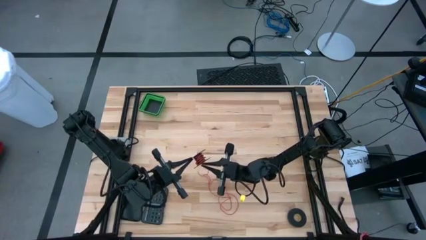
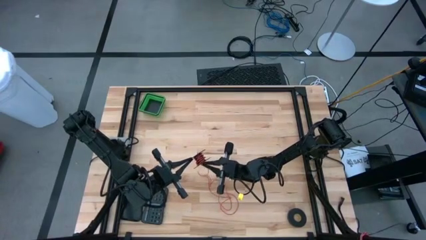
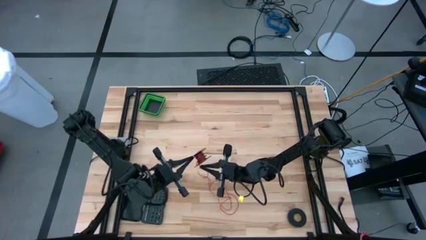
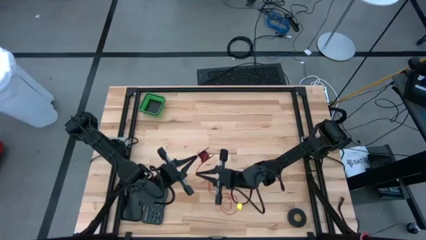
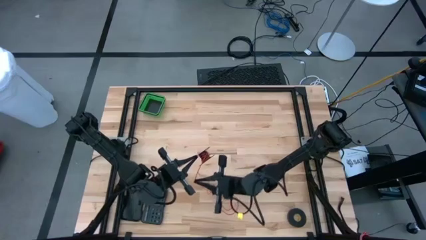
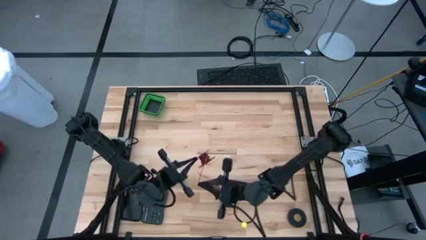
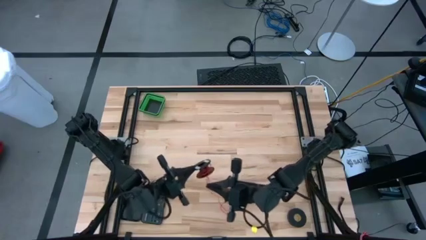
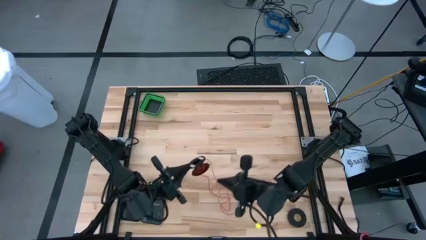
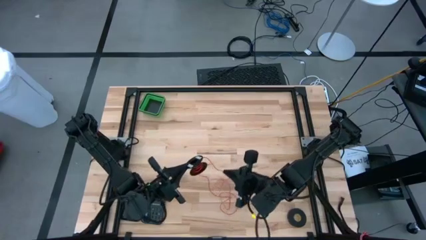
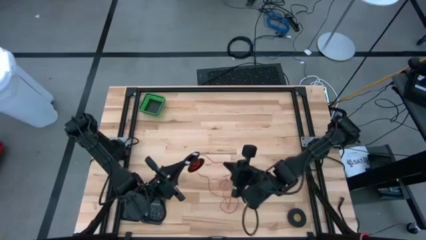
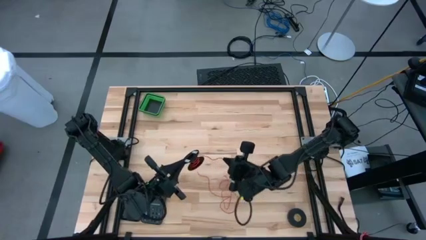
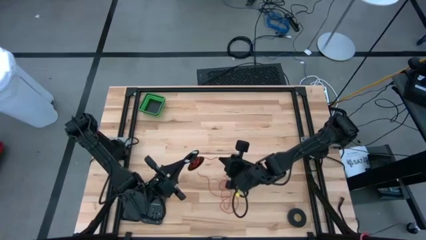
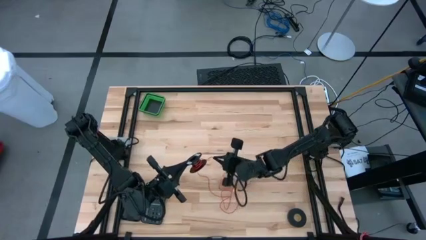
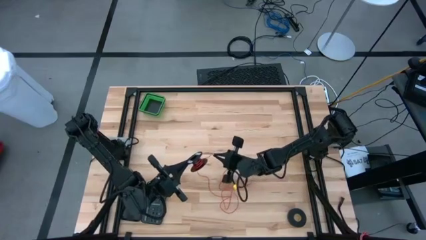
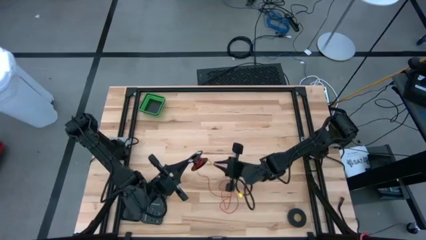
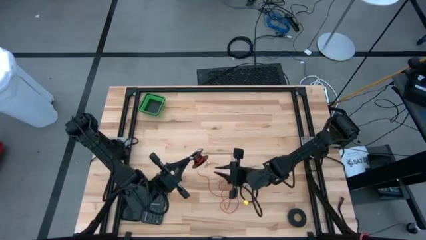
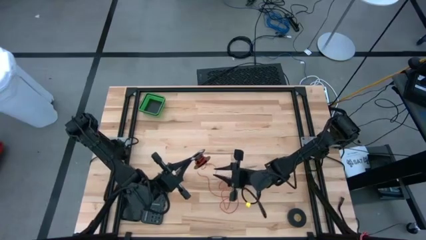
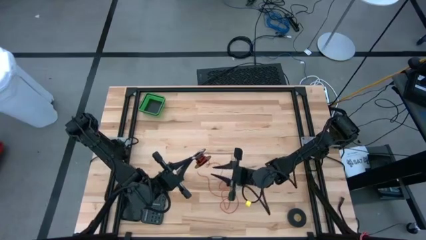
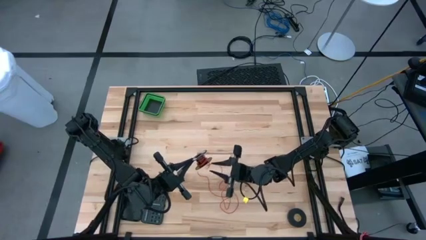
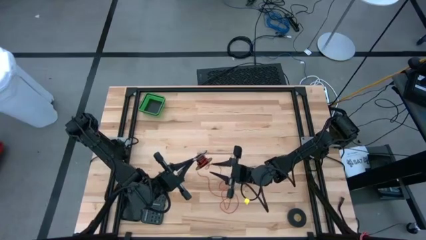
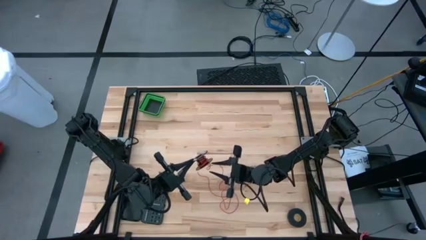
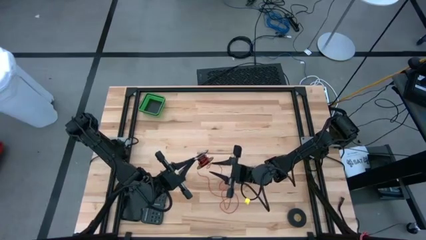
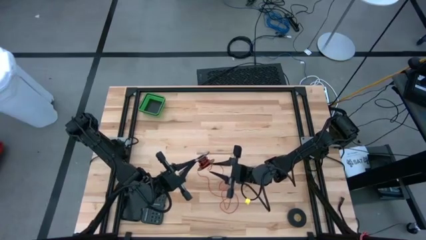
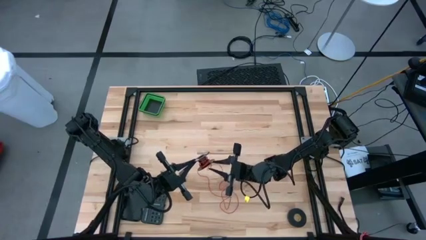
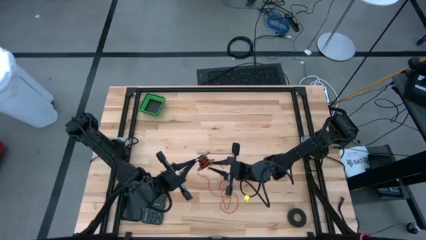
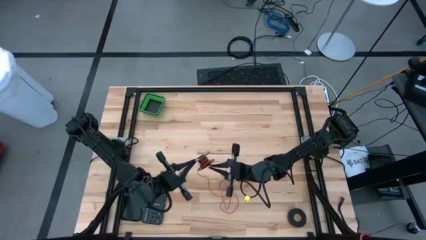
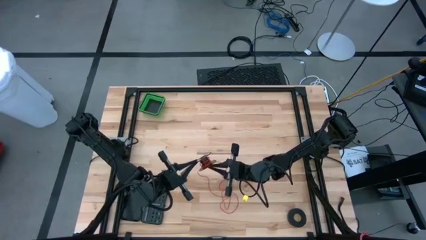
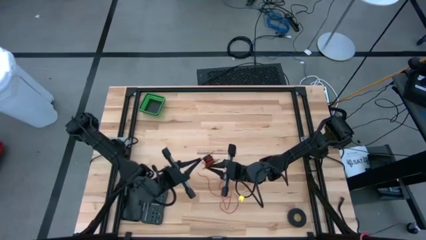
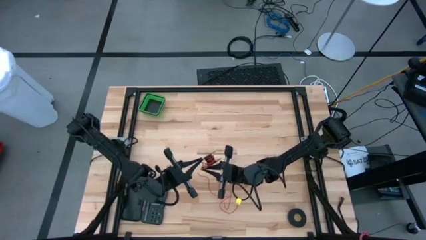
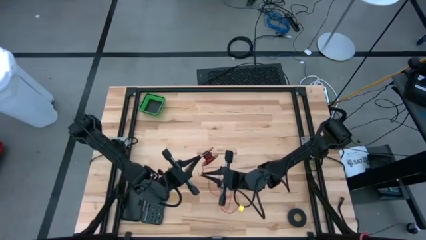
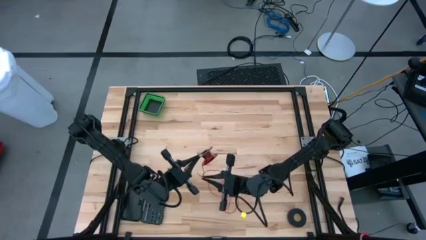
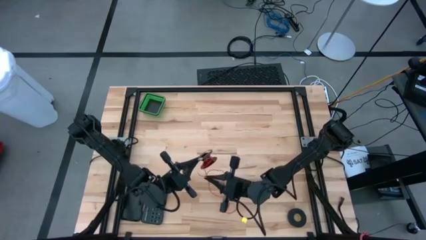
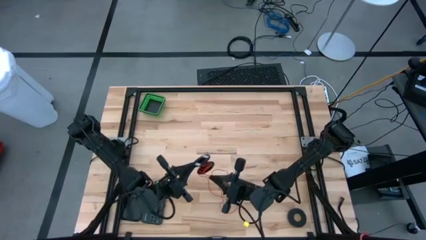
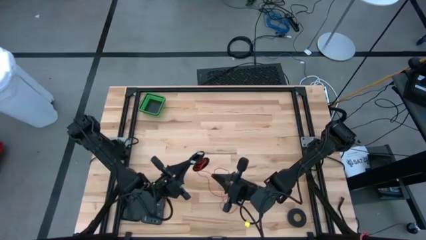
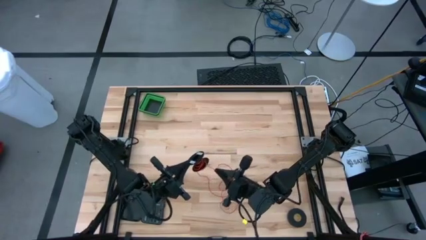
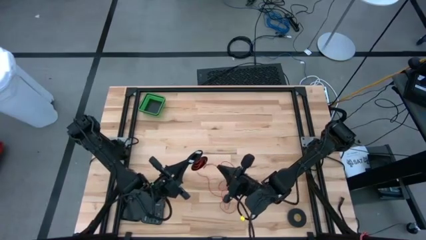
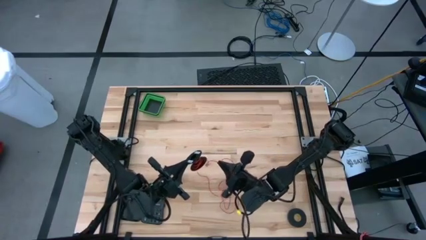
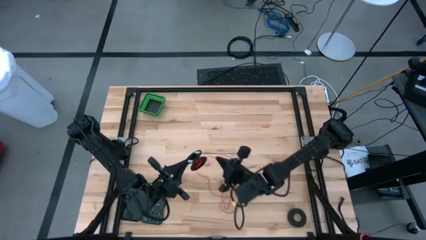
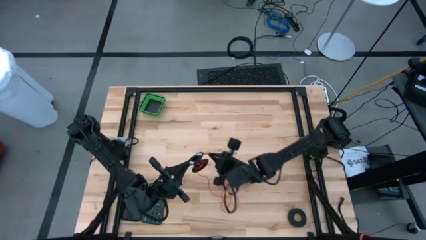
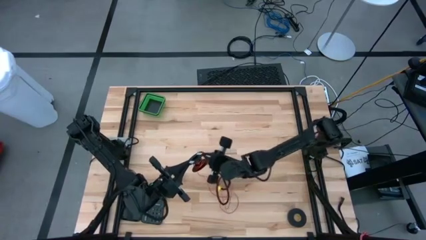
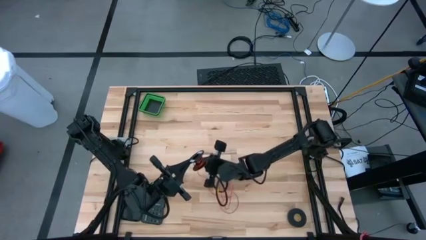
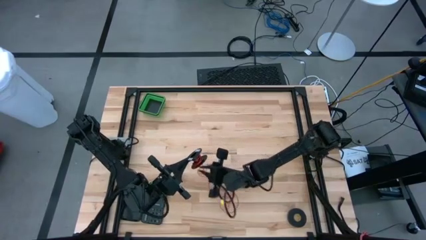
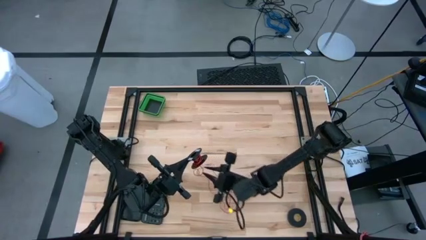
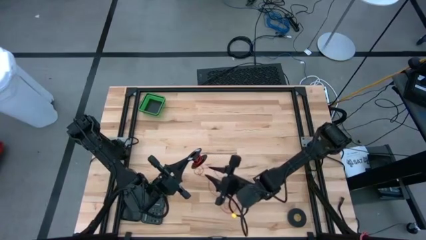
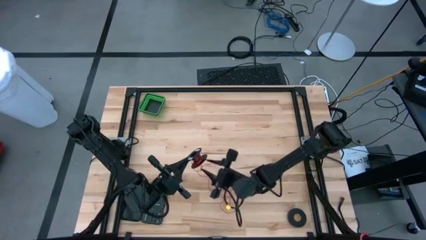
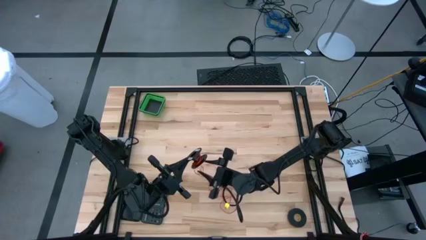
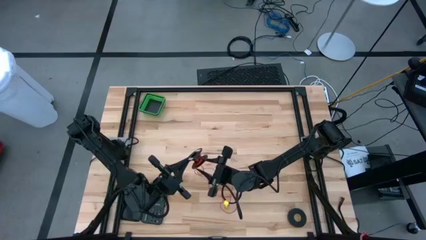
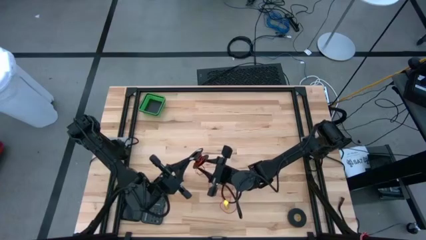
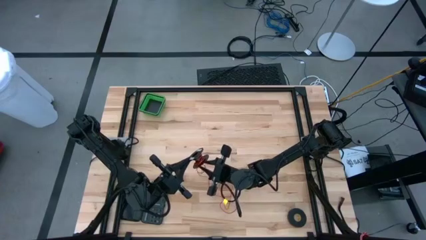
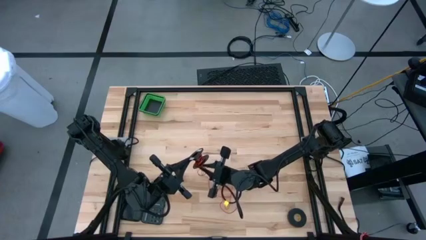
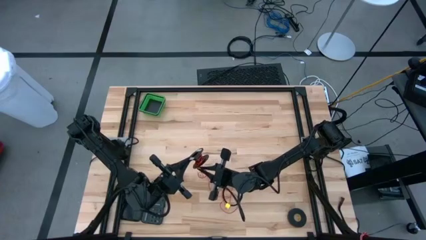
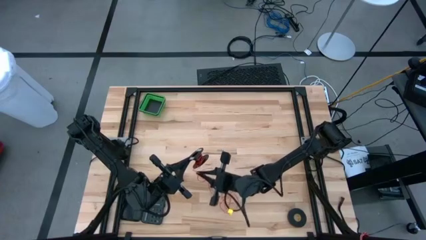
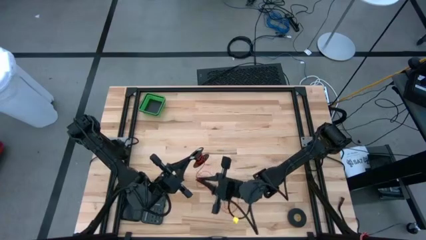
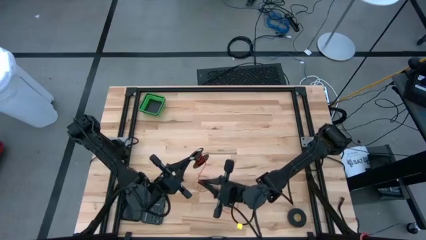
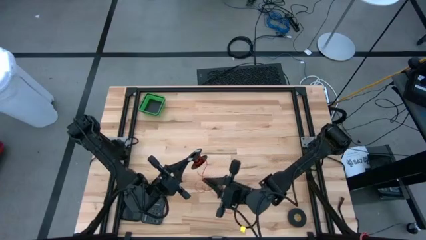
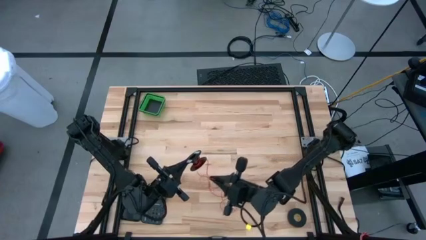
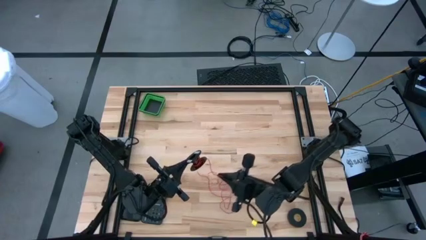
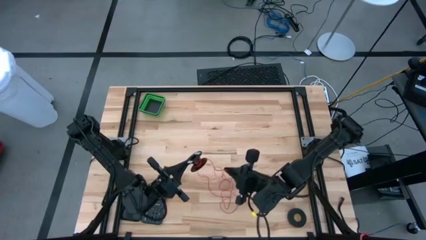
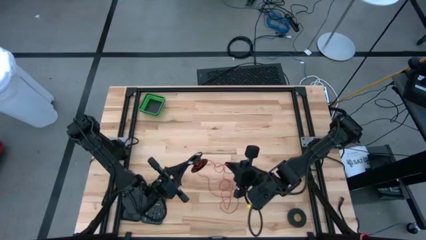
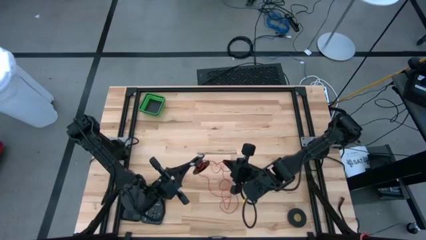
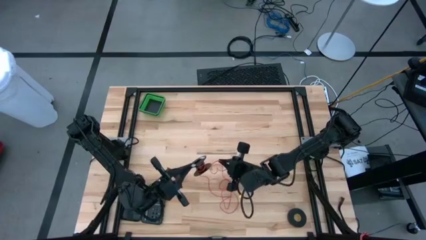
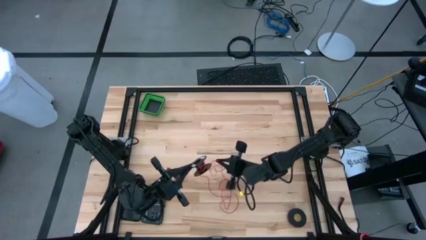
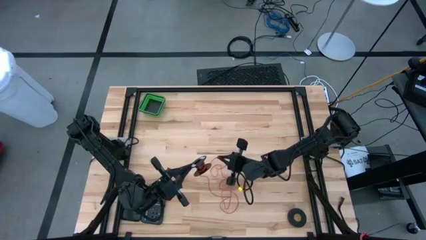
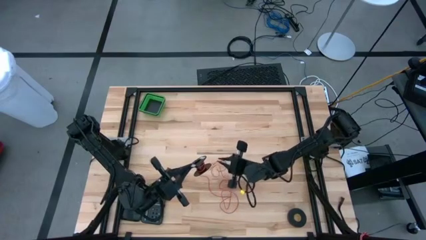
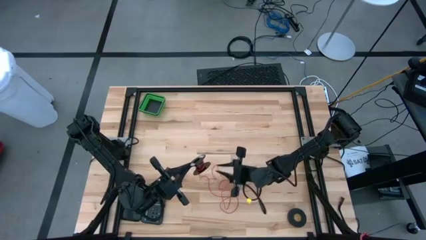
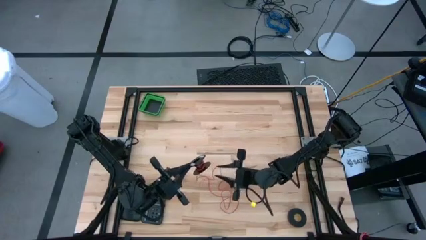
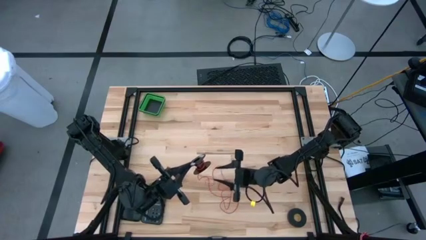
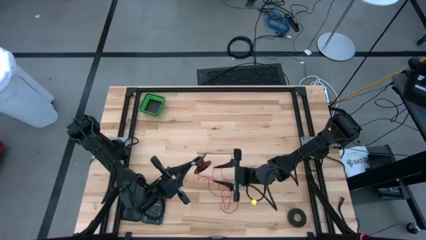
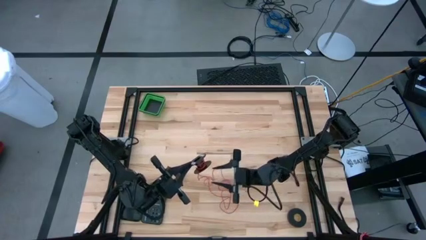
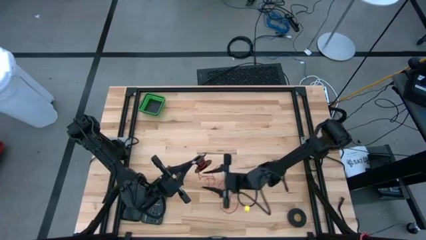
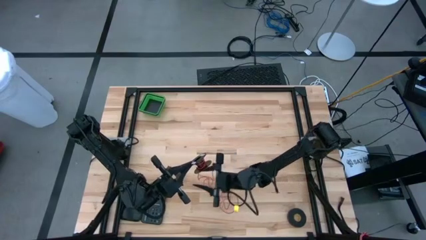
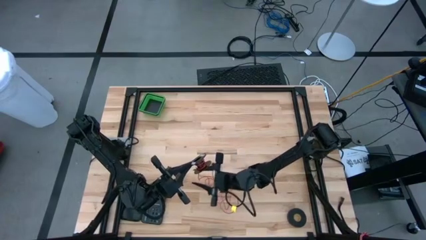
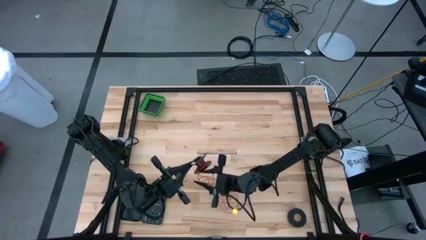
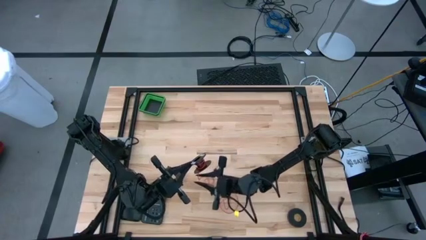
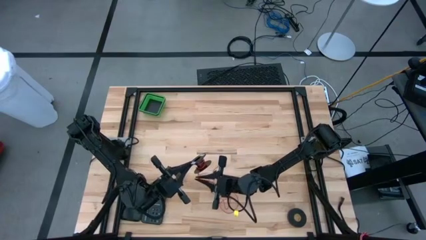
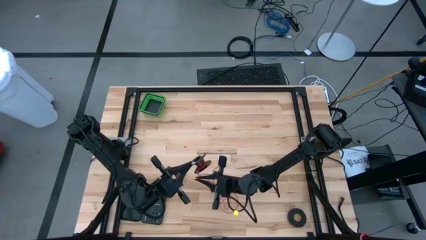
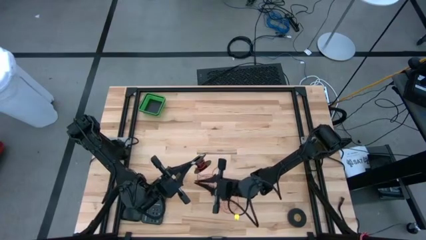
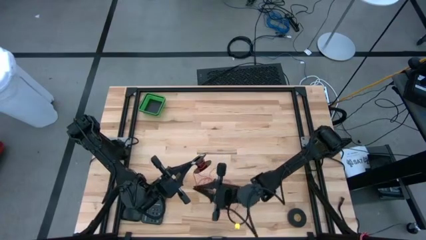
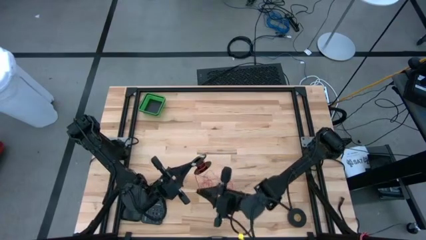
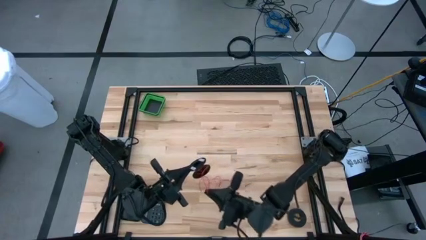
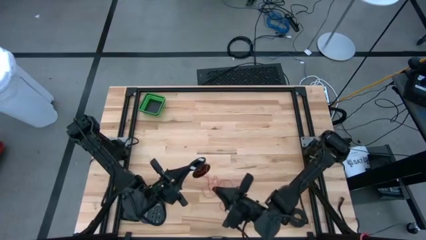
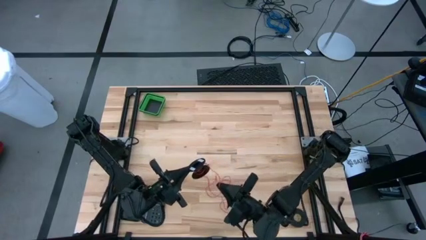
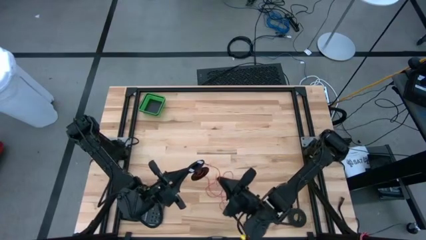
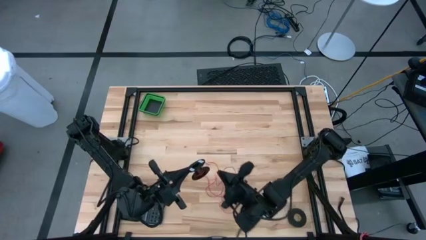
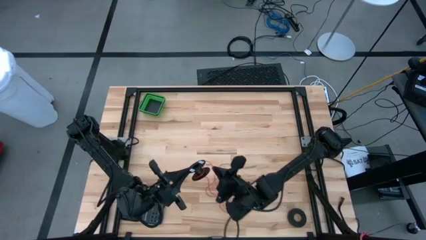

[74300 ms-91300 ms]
Task: Coil cords
Uncoil the red wire from the spool
